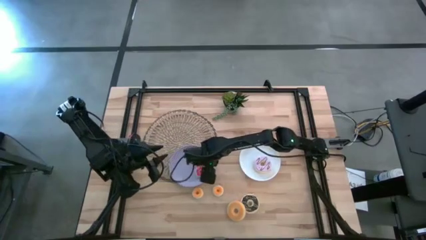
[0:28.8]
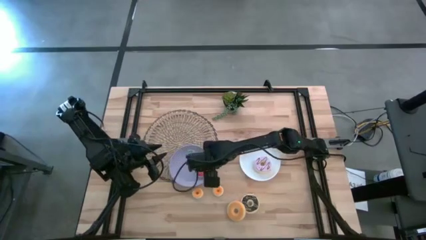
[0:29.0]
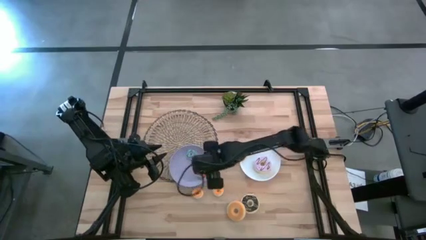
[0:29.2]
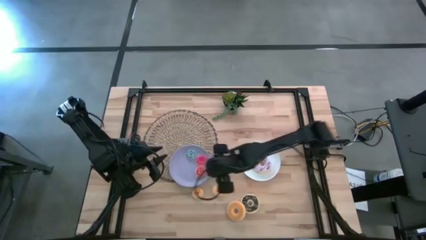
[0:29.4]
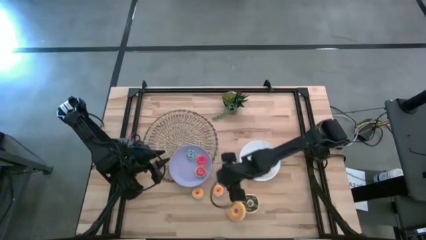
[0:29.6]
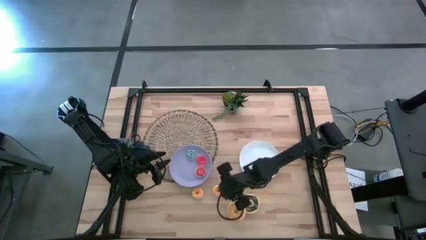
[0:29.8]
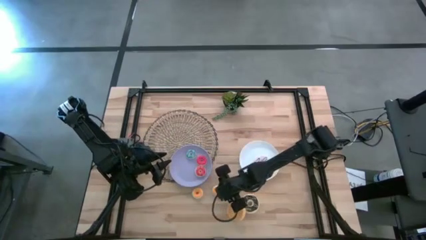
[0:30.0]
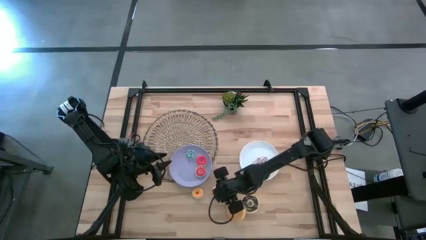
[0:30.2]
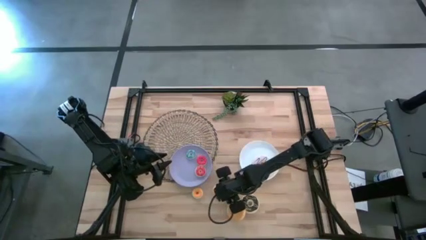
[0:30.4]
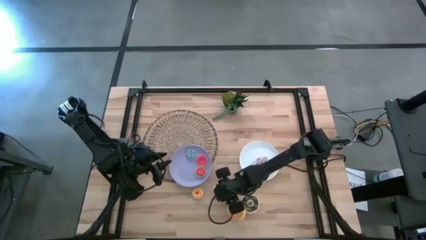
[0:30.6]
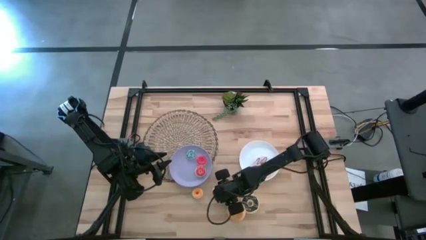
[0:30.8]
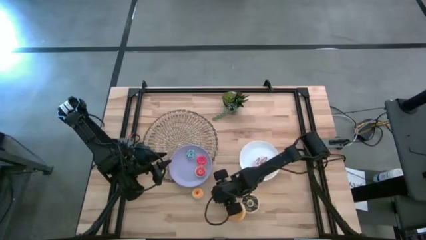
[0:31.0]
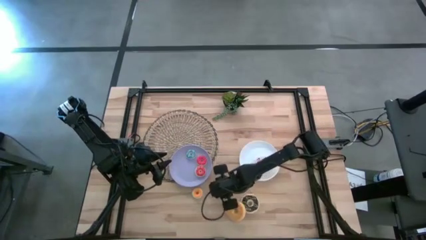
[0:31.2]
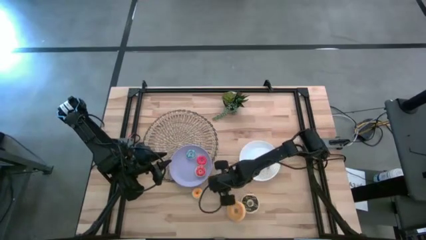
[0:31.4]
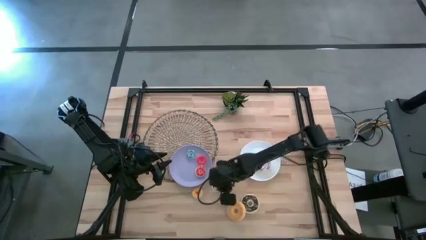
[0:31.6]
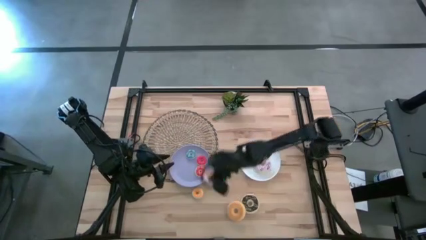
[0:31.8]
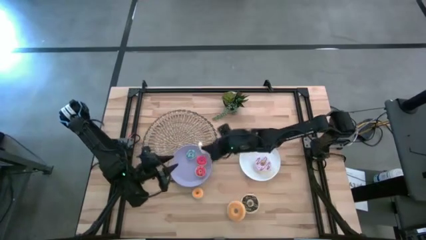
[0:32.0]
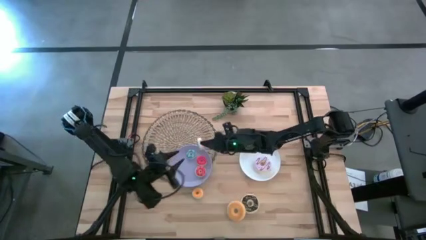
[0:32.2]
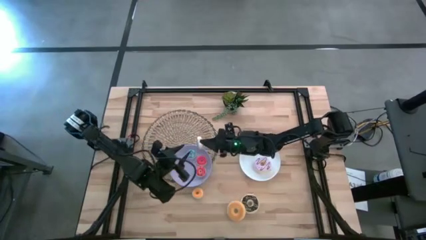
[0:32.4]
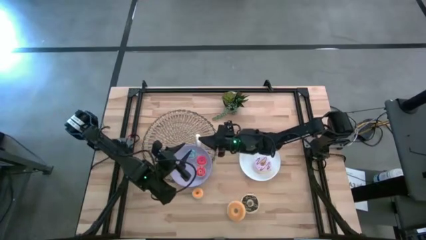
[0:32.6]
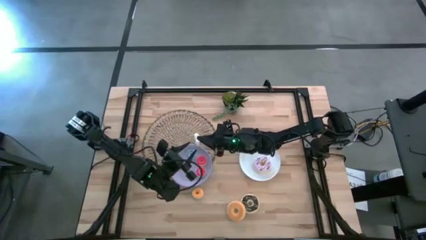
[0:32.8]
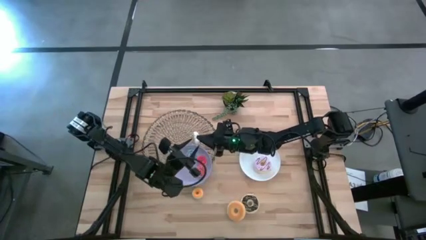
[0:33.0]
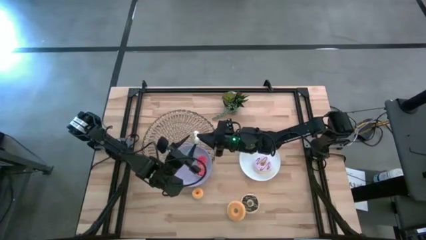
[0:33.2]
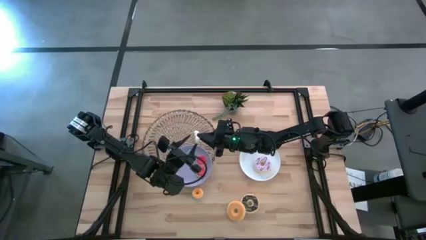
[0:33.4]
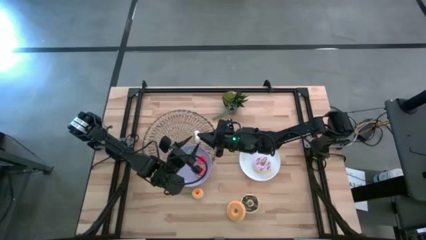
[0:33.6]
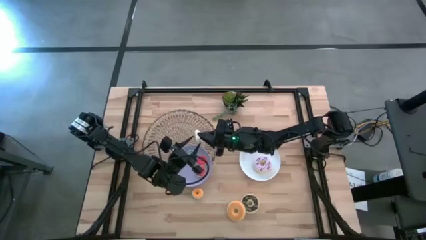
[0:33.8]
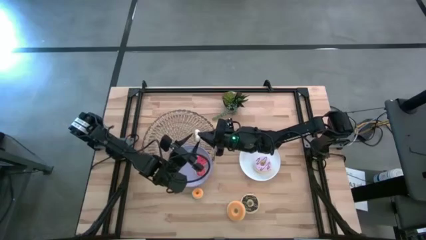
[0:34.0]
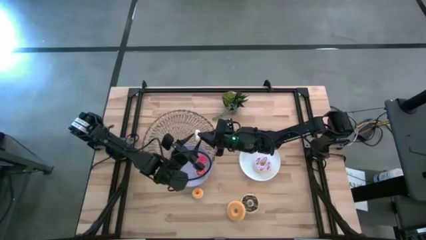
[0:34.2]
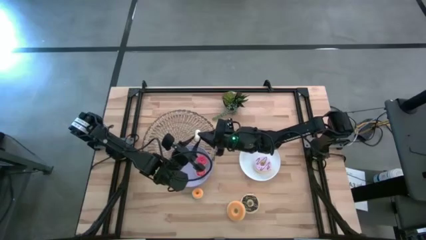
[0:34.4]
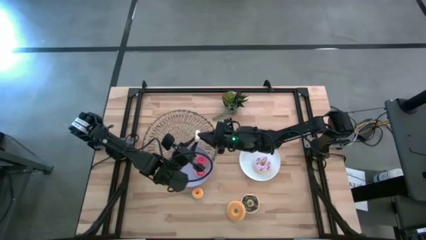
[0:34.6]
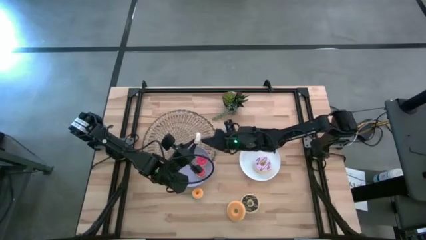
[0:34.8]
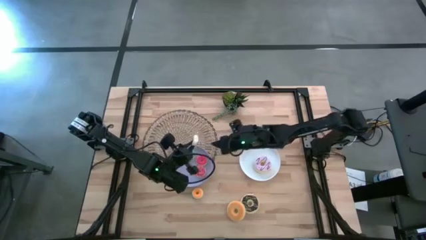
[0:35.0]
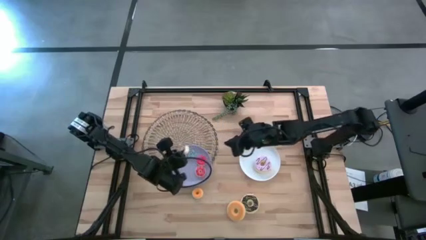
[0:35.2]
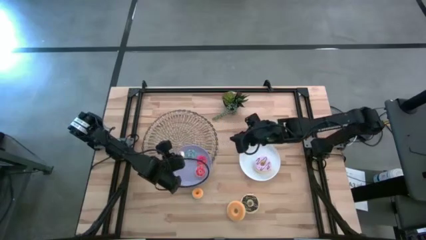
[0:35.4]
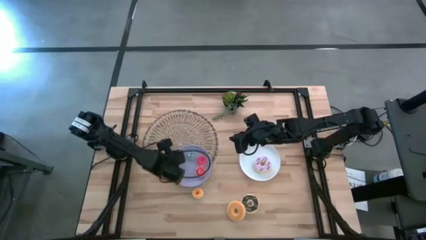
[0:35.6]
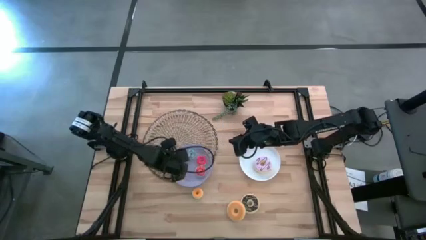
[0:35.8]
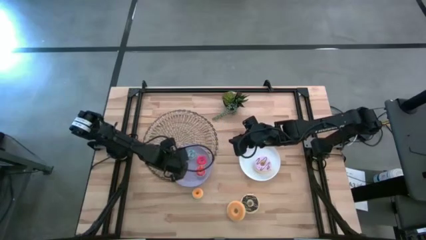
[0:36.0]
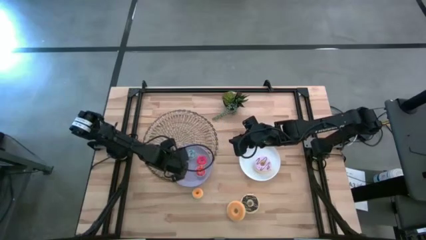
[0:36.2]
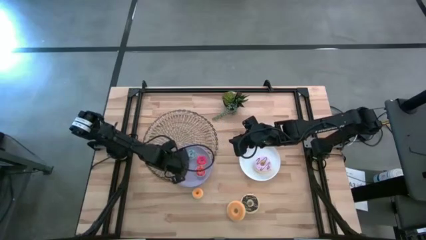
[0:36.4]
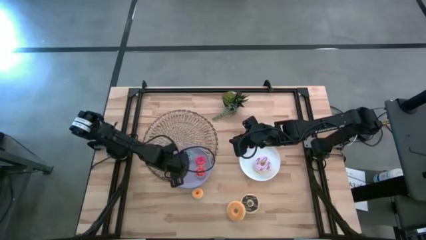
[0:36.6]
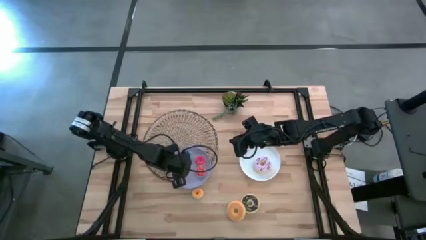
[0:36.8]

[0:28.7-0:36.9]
Task: Pick & Place donuts
Put the small white donut on the purple plate

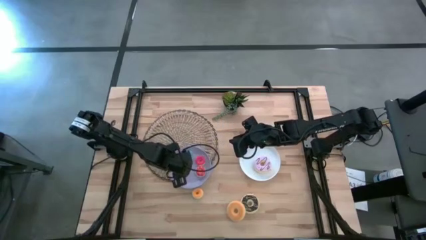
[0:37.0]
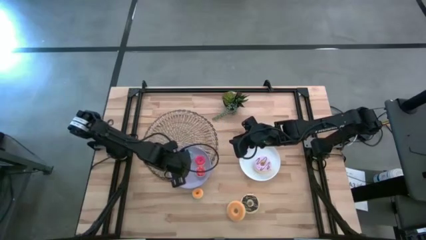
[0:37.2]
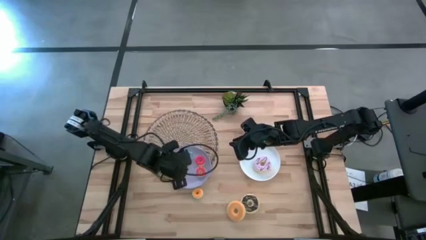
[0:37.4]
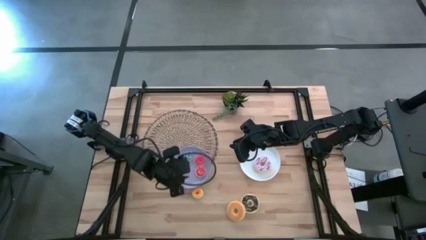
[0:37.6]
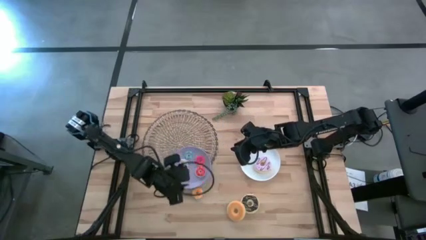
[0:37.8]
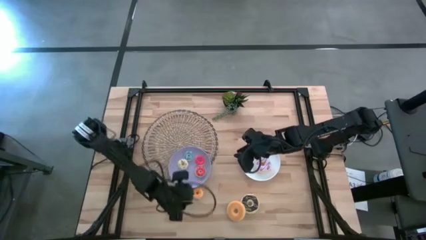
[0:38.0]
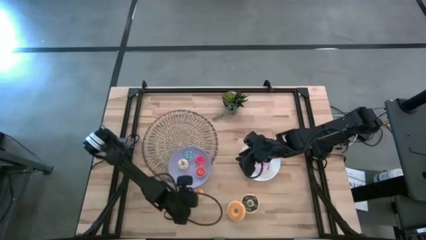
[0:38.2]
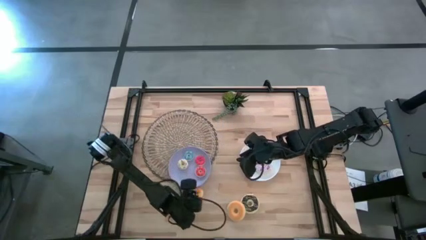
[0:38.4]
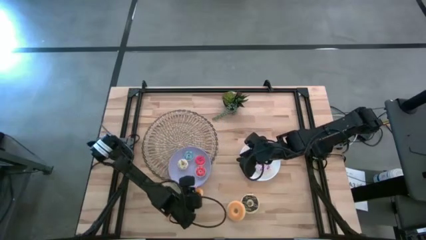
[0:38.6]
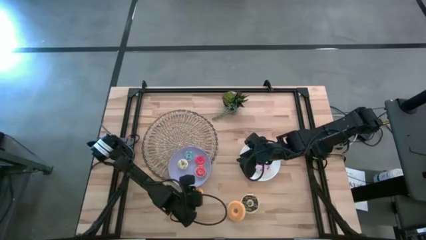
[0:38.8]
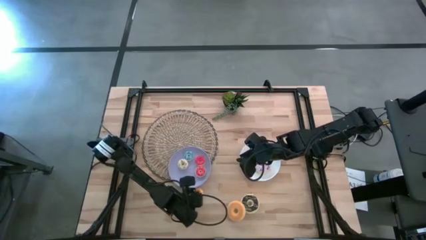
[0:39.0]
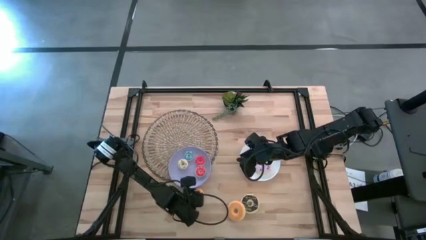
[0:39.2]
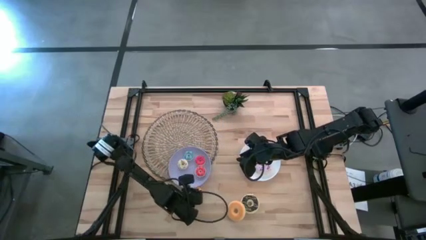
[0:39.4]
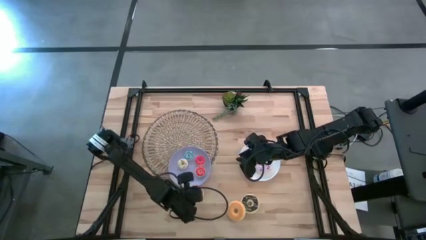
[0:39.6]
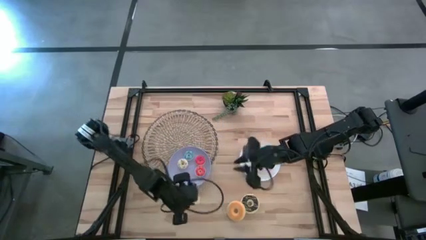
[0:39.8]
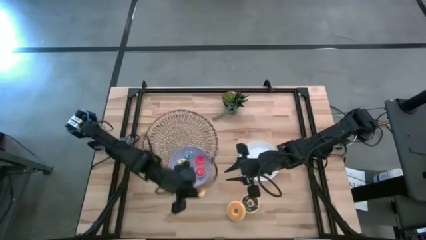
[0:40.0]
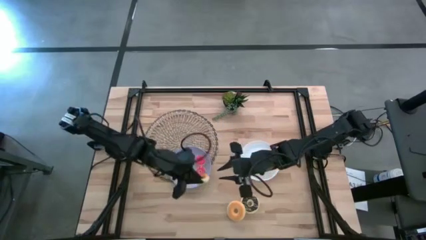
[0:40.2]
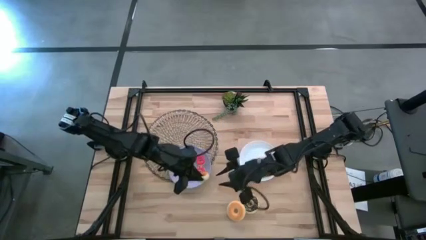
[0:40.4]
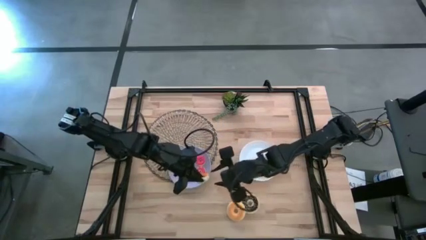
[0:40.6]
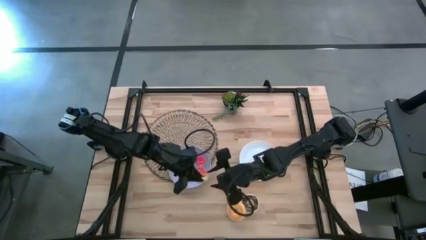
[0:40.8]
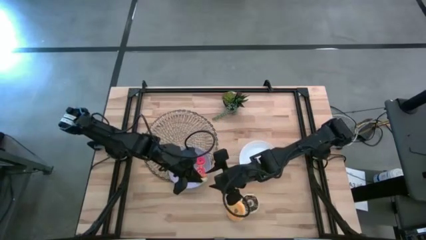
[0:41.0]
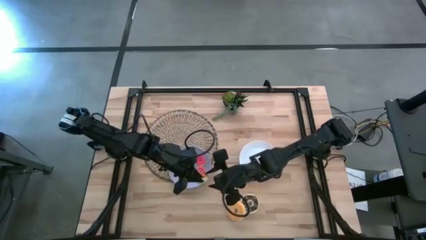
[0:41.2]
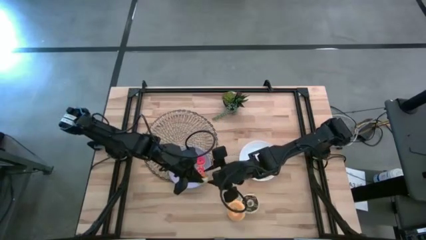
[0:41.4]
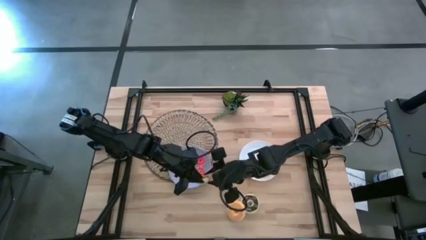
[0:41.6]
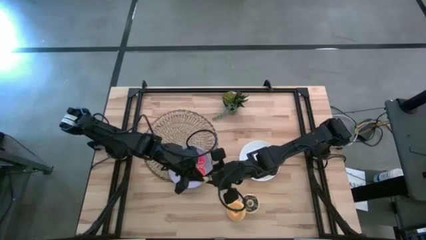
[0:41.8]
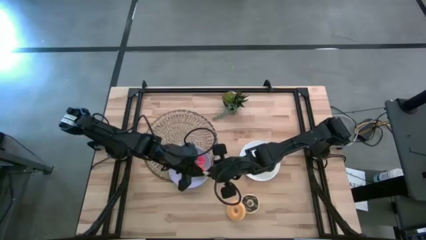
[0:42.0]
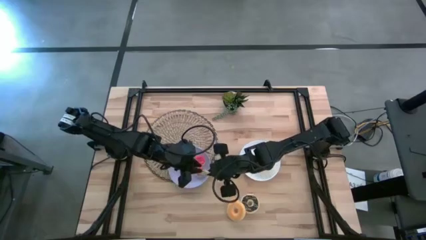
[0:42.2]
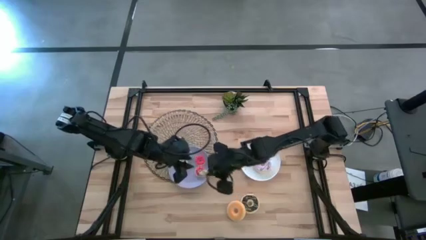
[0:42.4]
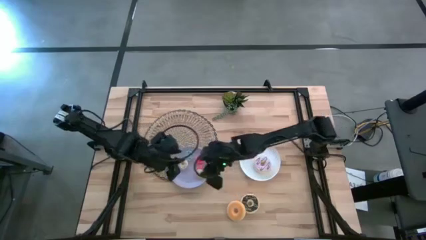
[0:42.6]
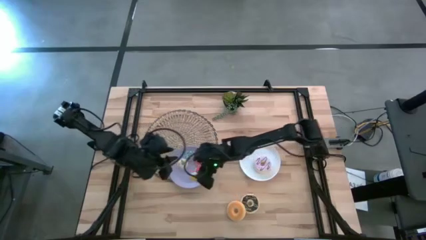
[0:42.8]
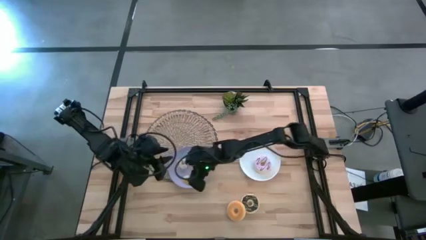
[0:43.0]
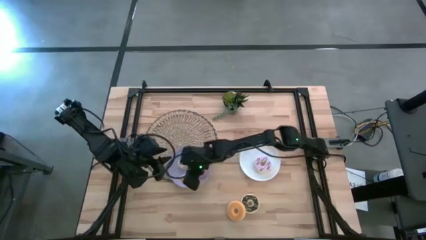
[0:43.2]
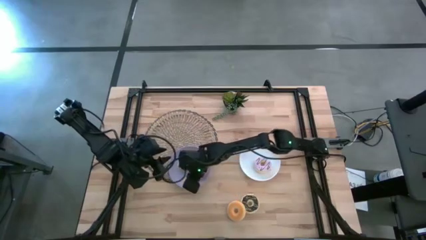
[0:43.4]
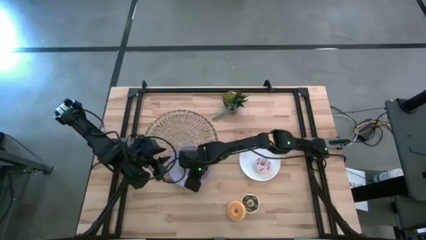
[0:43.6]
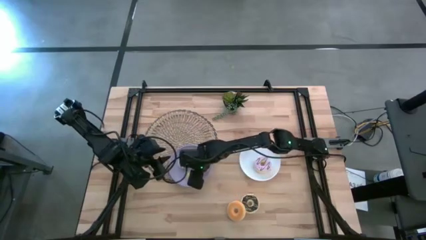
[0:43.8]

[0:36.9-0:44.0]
Put the small yellow donut on the purple plate

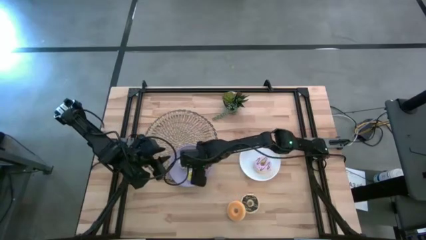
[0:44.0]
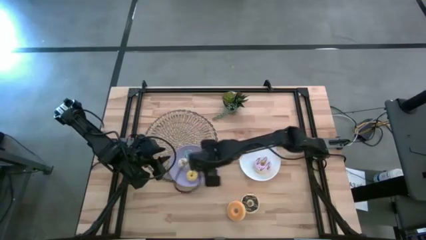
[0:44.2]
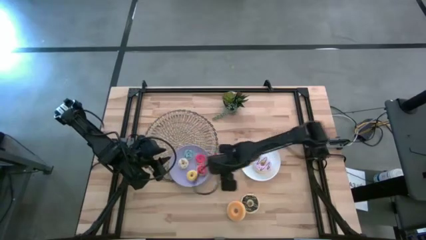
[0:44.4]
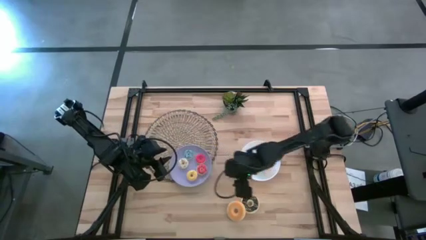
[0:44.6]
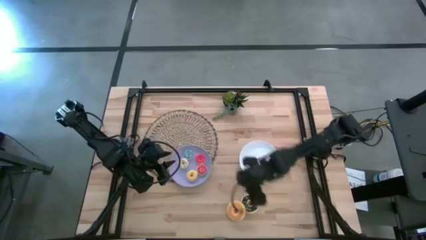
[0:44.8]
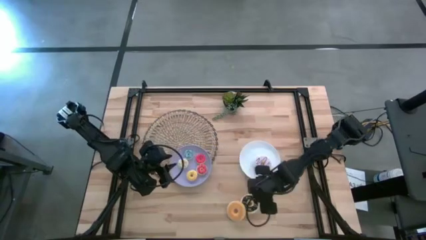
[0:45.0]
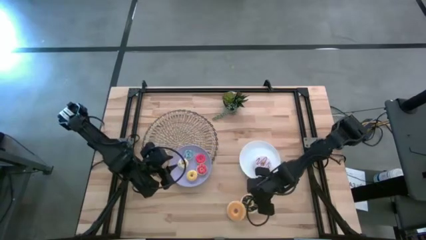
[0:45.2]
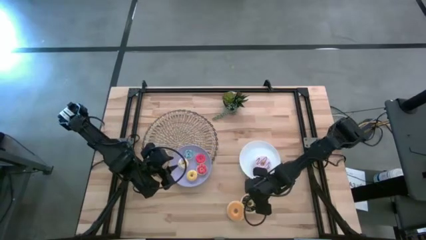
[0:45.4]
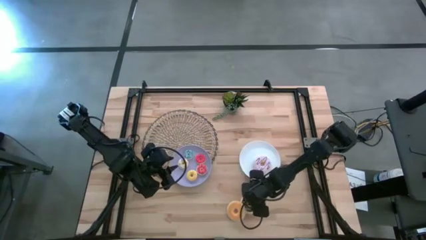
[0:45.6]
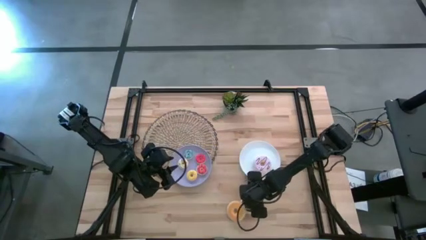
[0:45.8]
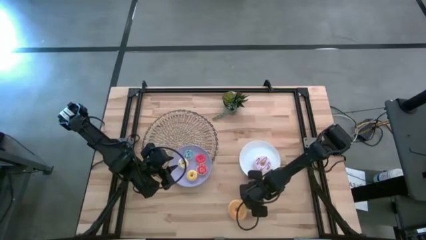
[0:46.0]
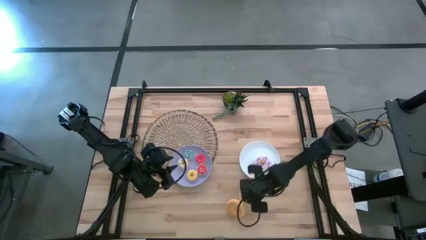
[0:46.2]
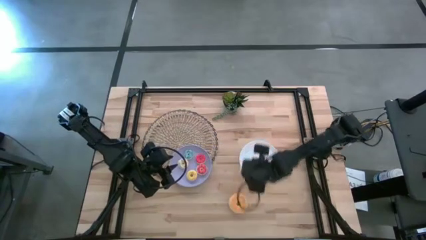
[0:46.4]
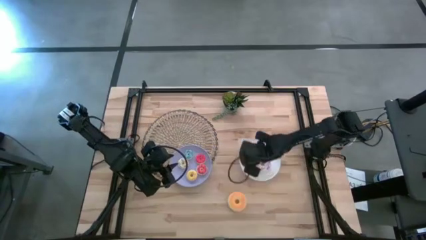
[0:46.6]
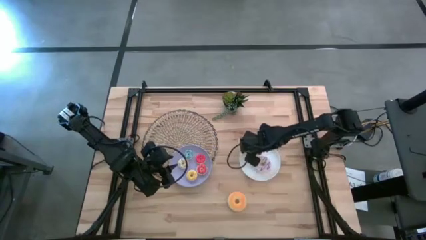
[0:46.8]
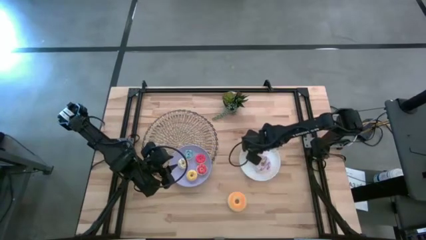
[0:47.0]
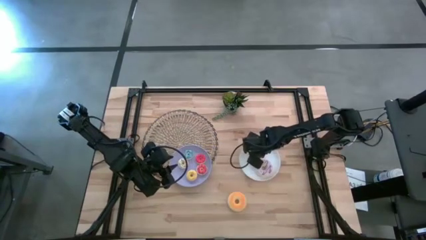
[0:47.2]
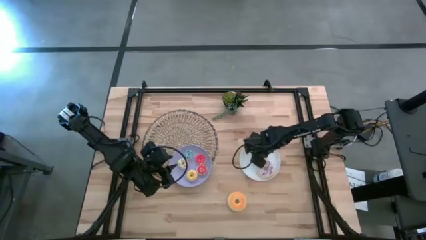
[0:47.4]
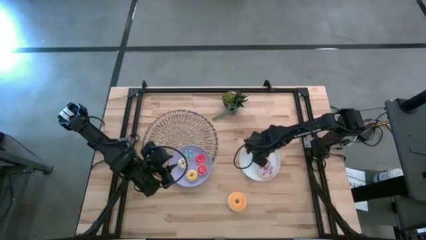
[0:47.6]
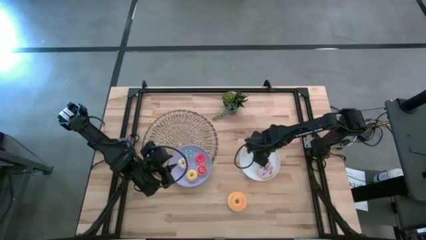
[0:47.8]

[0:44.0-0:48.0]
Put the large black donut on the white plate
